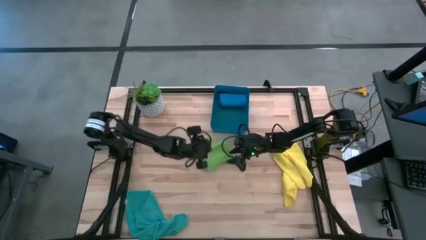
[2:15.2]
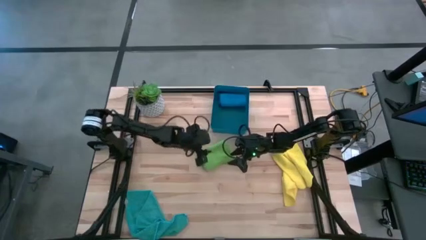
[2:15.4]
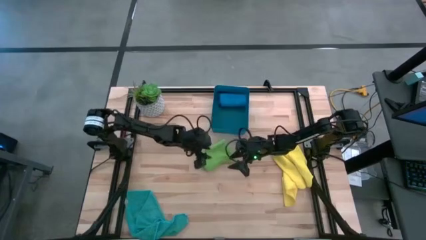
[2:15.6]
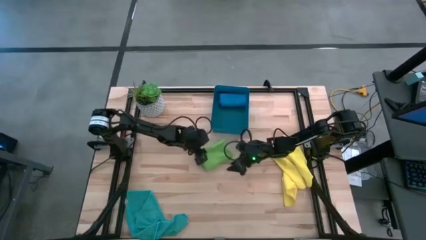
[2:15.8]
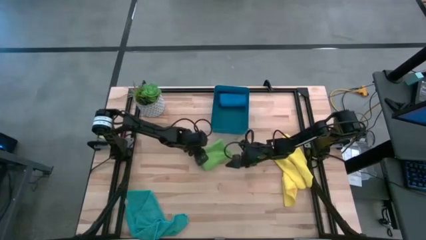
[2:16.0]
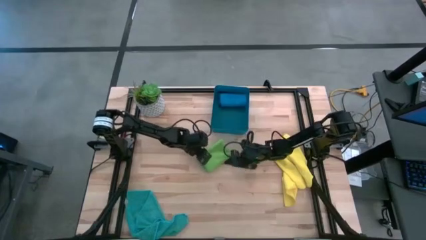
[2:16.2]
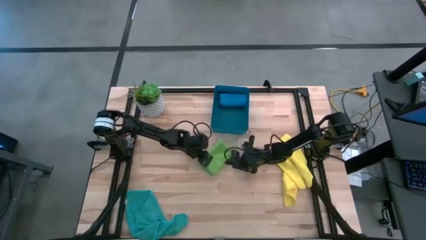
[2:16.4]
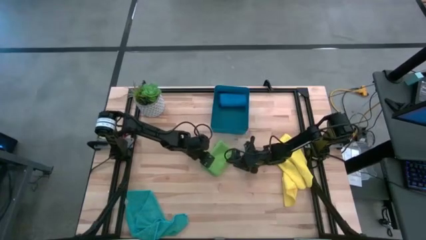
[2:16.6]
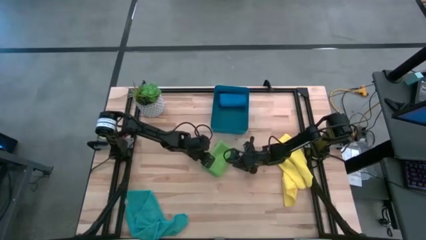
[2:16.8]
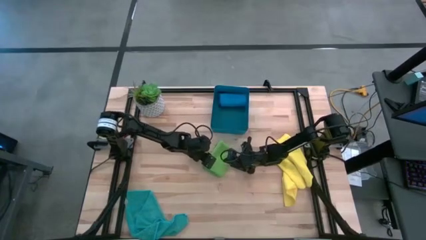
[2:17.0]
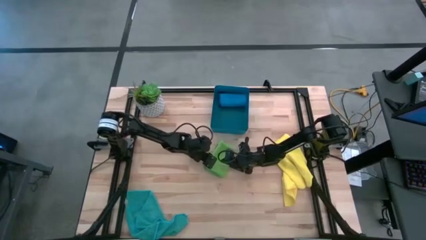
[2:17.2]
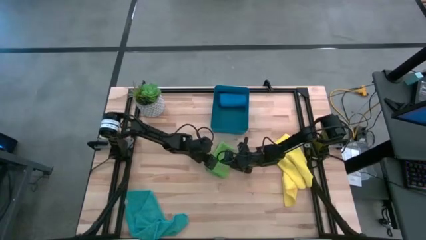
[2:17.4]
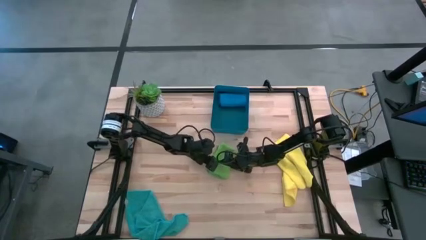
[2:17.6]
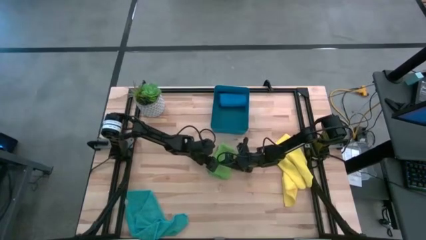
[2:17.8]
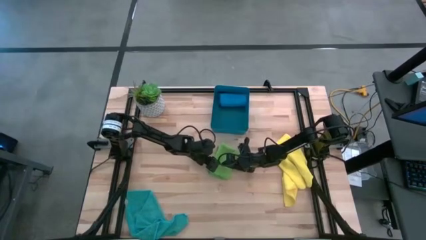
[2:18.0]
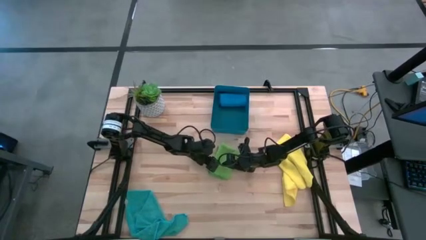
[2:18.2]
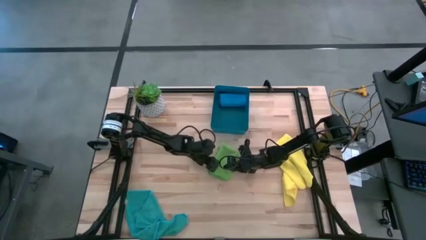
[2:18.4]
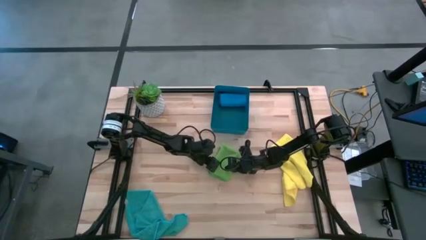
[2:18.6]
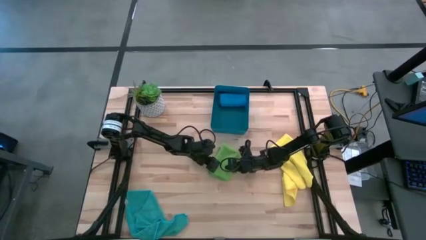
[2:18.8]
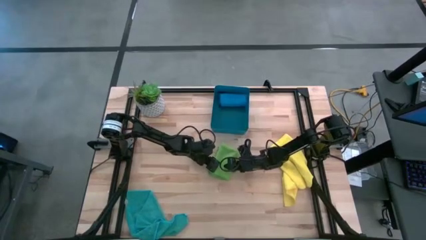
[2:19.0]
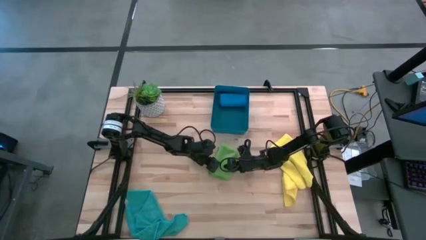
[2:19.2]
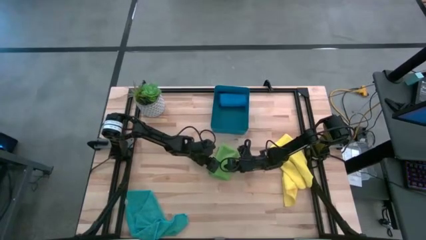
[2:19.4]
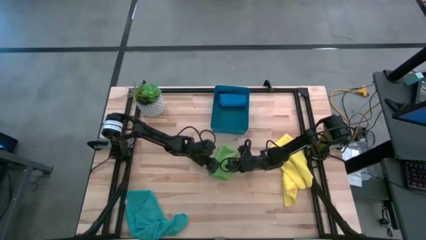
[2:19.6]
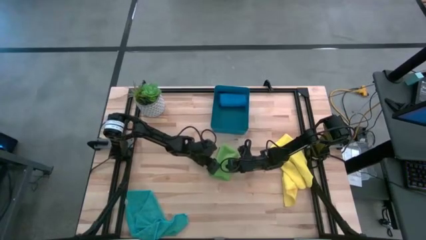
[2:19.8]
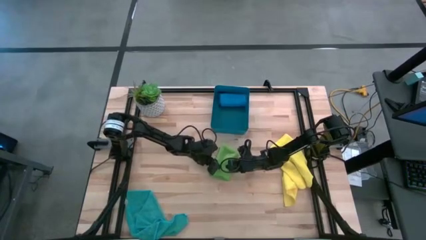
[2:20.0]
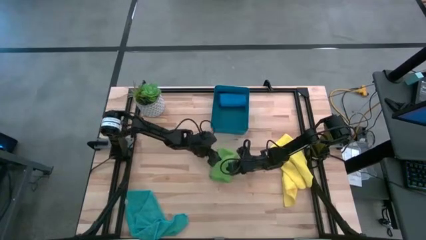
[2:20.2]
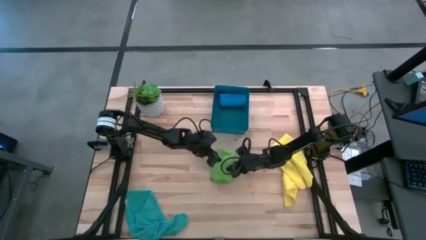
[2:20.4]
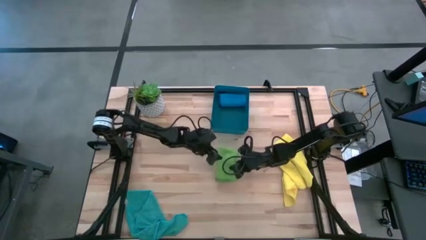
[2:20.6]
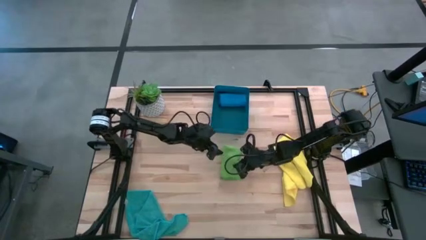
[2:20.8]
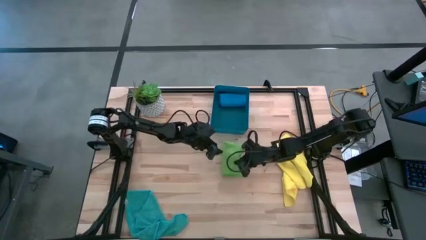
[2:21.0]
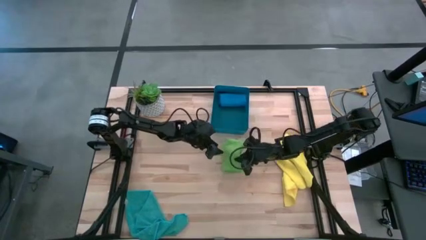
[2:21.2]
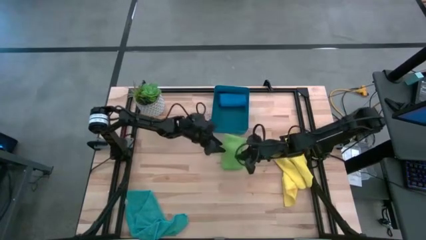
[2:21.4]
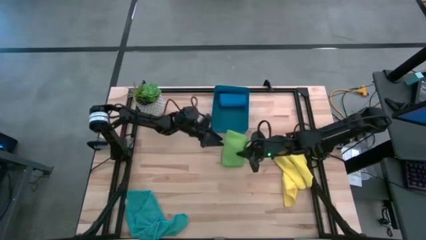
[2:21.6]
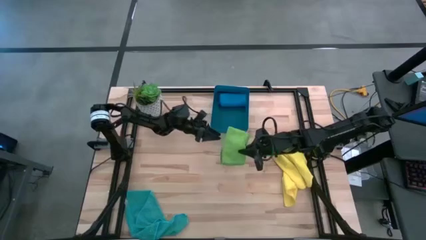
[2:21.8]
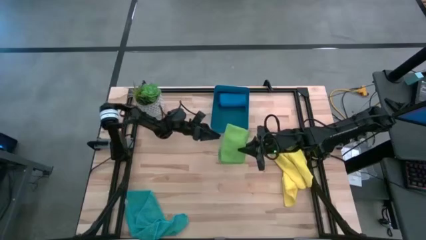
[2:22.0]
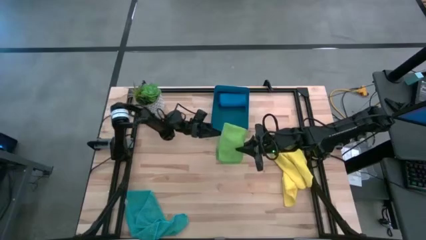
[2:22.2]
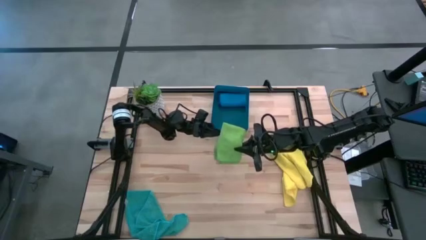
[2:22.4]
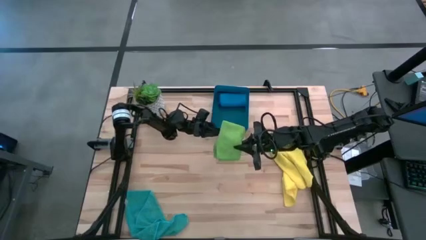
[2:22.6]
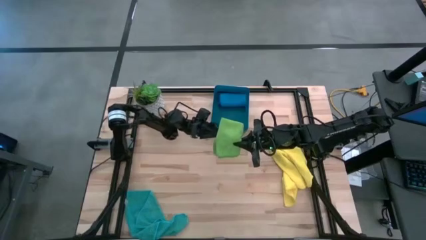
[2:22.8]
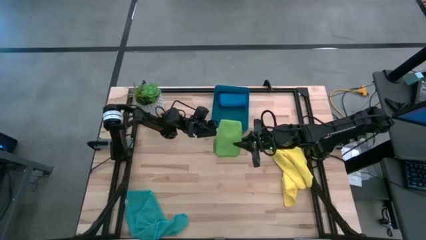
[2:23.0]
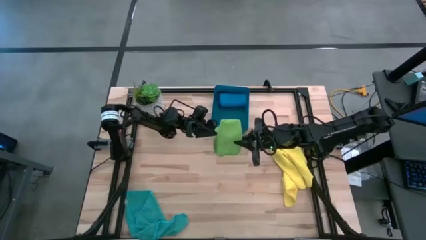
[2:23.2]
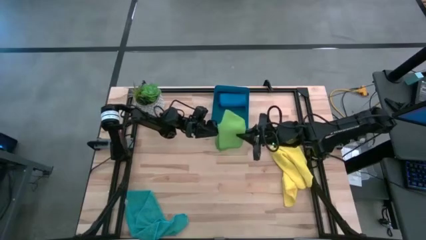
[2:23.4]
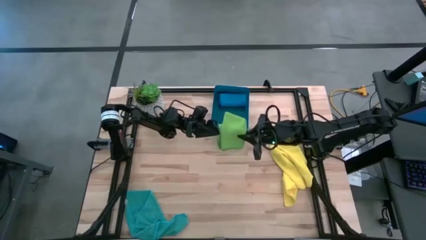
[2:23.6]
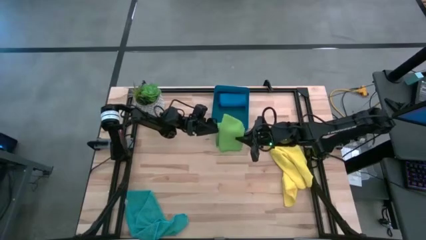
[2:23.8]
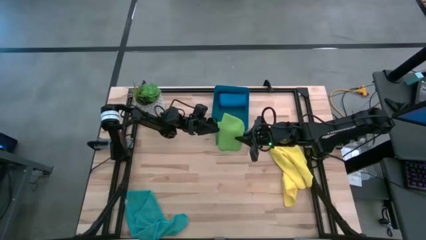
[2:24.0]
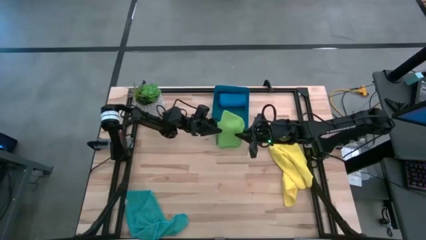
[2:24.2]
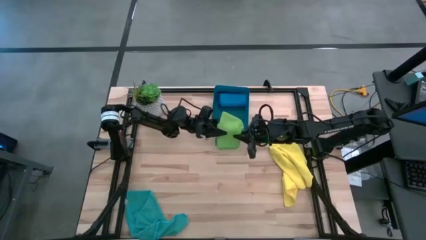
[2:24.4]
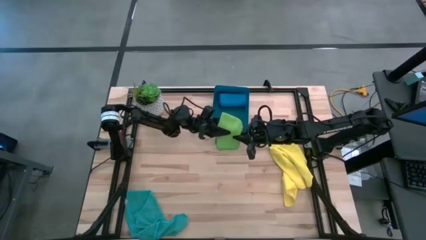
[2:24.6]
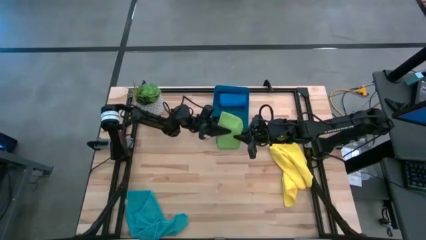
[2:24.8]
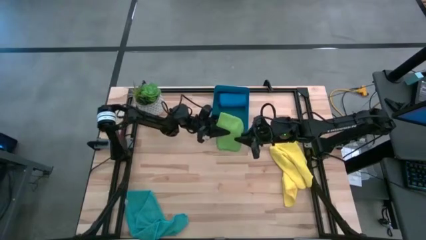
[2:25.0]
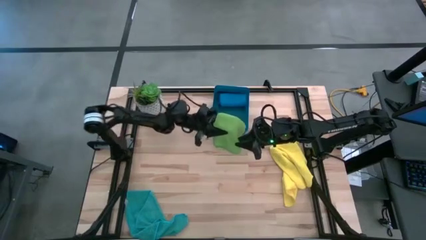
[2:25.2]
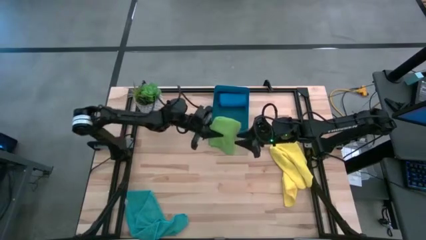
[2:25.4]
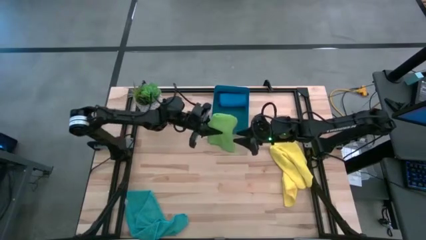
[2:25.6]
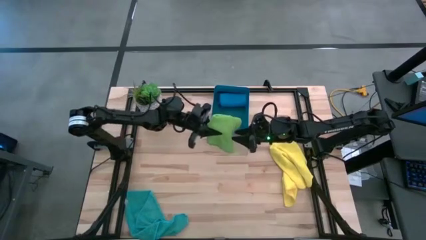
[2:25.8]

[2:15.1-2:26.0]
Task: Fold microfiber towels
Put the green microfiber cloth into the blue bin

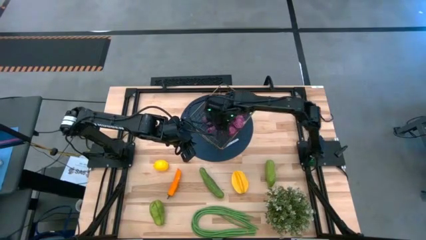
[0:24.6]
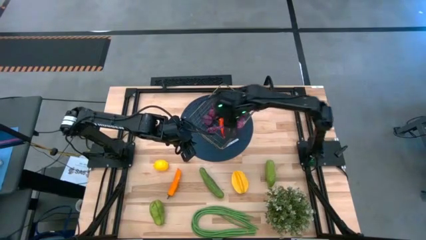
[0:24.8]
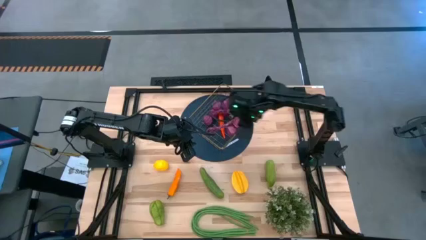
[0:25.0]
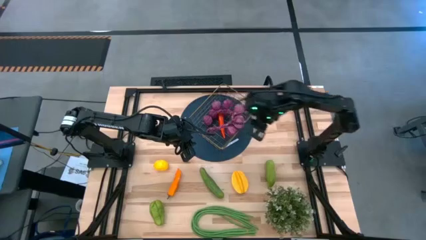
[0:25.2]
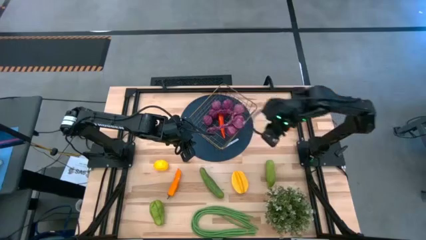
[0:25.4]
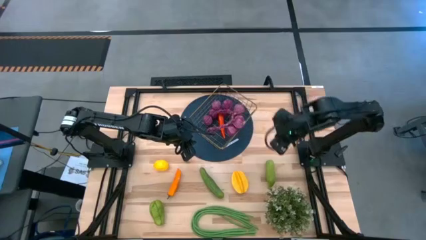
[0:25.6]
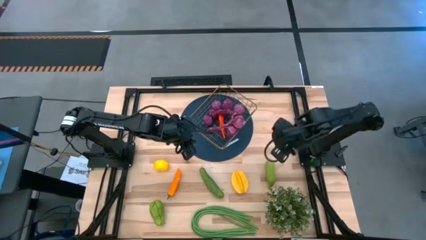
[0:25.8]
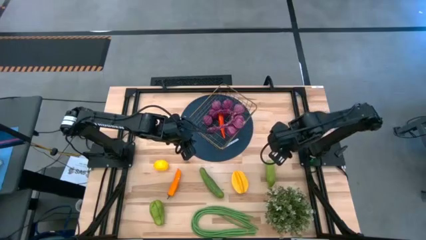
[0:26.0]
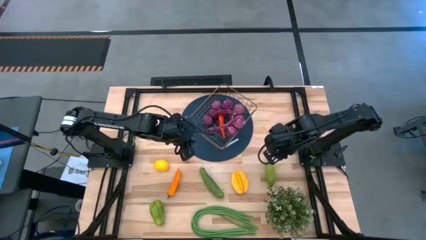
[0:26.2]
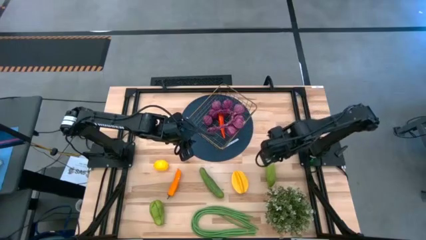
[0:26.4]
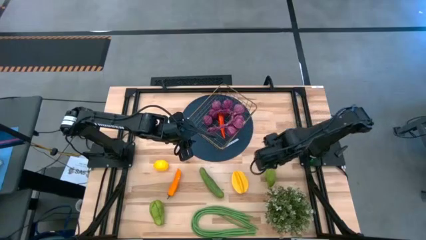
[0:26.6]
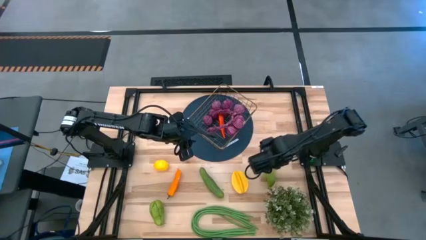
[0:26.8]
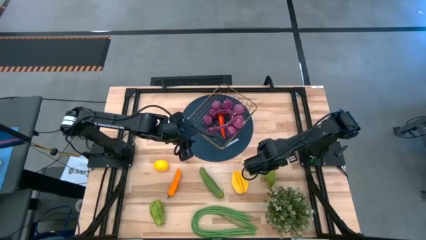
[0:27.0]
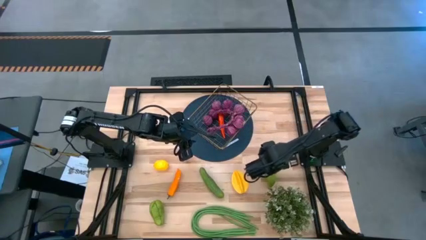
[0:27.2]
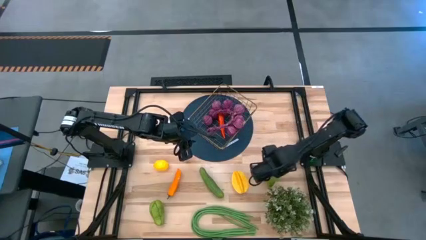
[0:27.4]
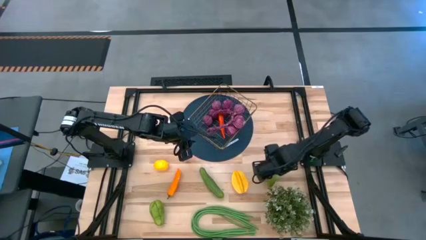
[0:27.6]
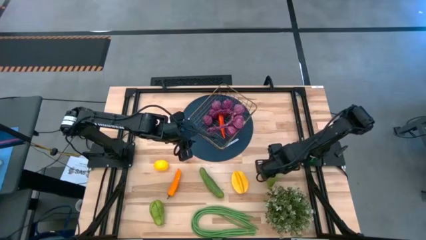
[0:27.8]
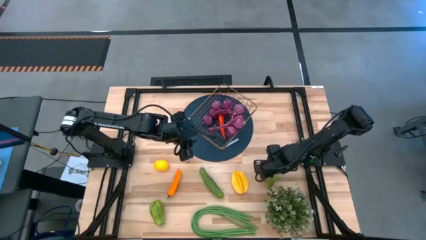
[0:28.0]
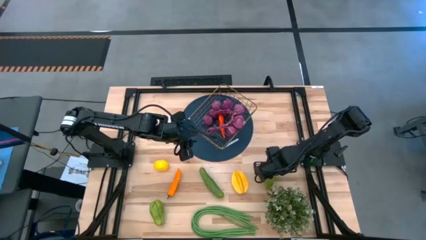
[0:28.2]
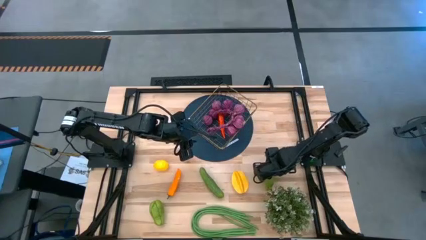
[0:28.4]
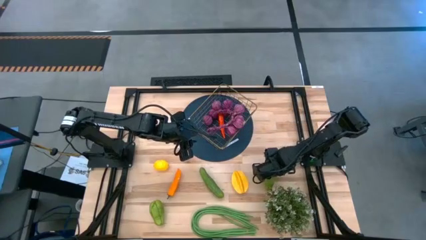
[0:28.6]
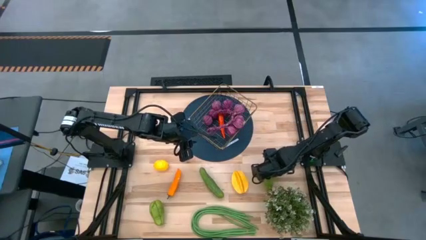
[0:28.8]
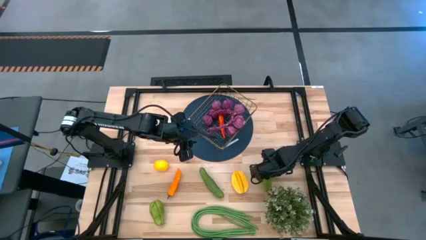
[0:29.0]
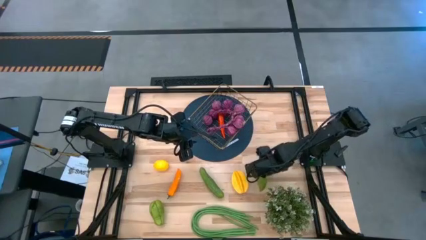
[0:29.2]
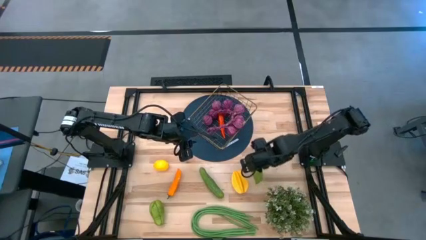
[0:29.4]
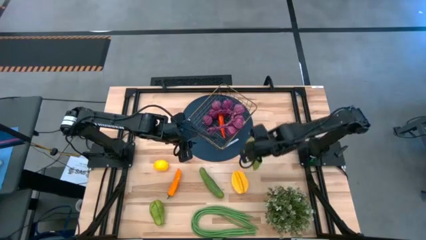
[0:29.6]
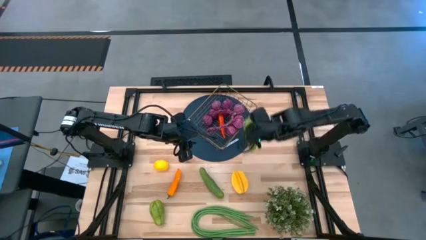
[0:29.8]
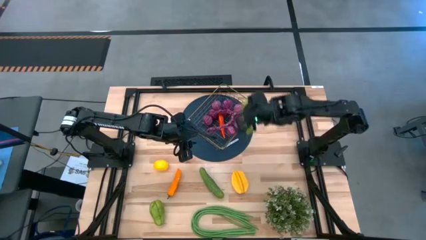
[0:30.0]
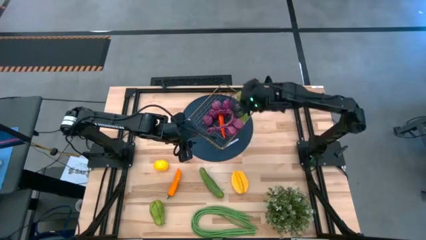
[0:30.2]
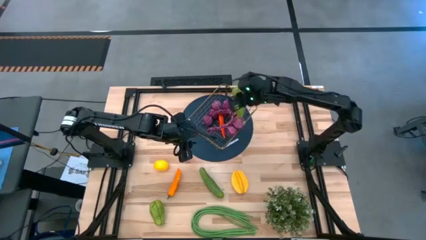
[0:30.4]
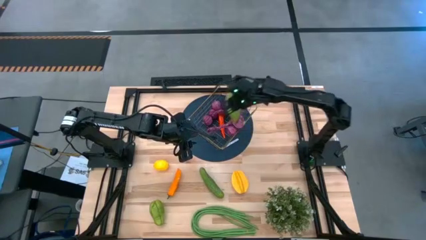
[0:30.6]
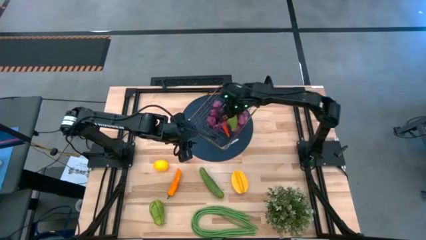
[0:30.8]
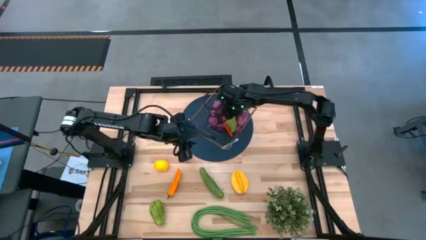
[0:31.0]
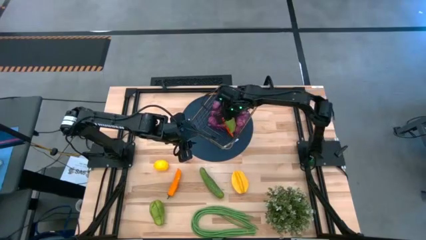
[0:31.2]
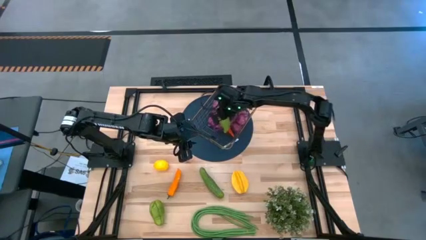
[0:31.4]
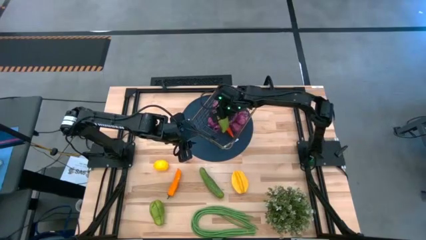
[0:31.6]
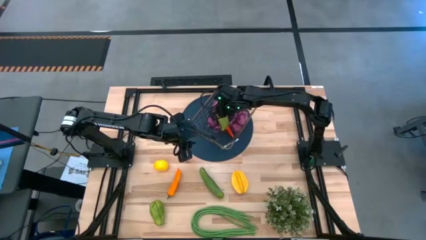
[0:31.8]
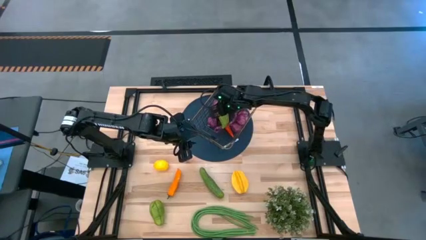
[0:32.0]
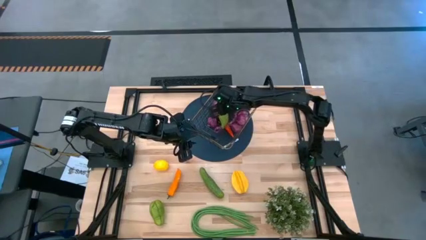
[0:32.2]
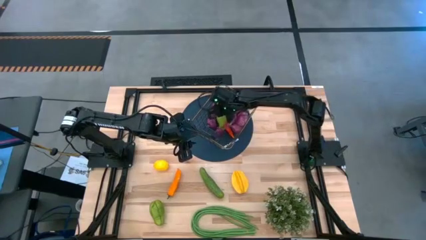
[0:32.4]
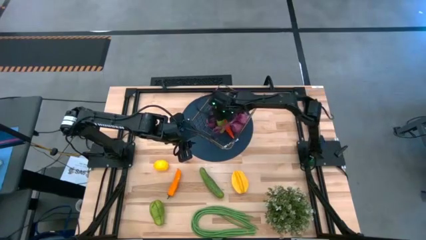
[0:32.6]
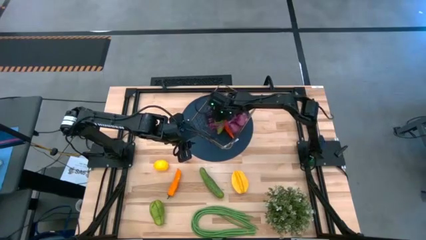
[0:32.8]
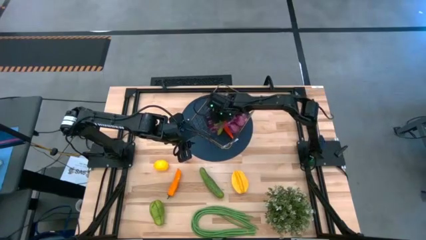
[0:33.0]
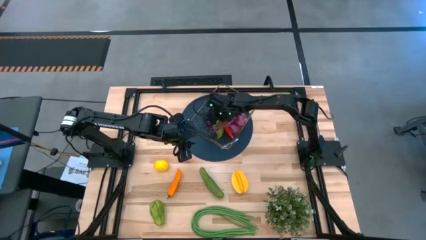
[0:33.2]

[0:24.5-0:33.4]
Task: Build produce basket
Put the right cucumber into the wire basket
